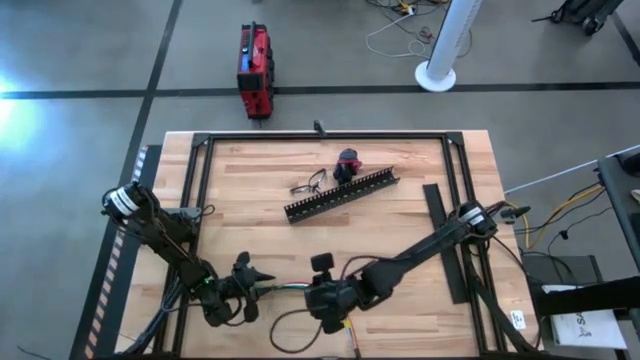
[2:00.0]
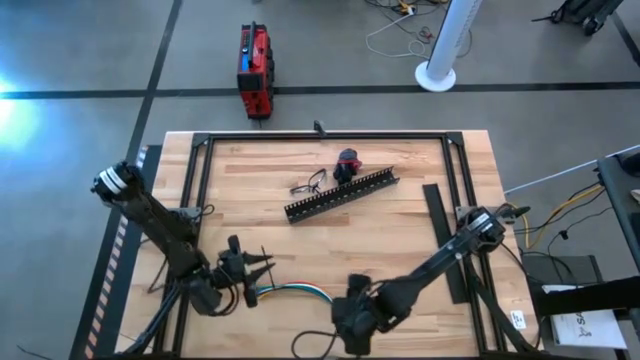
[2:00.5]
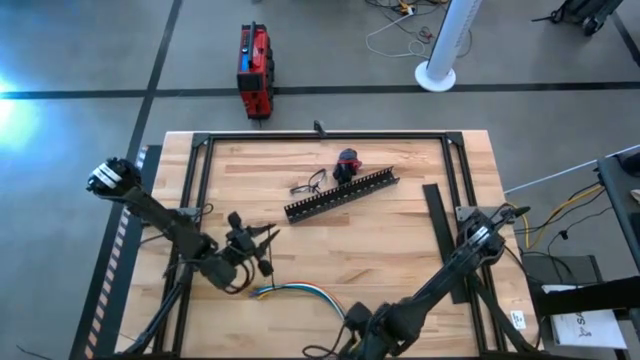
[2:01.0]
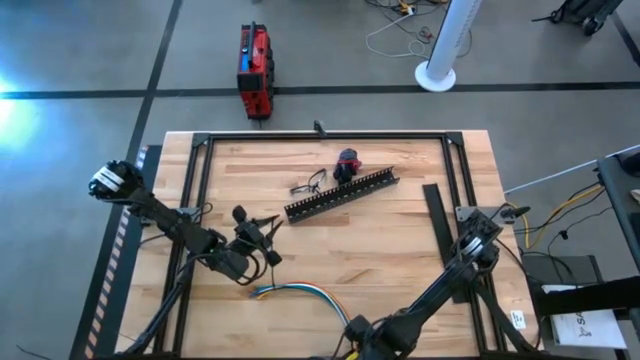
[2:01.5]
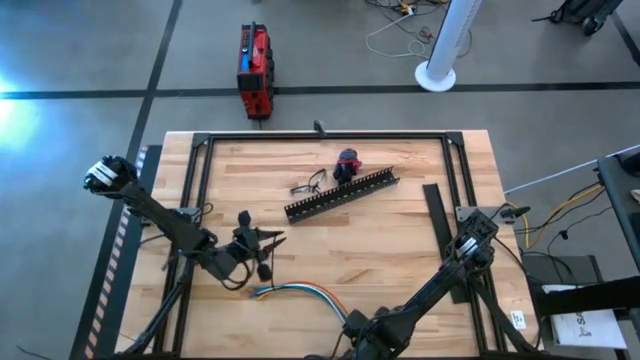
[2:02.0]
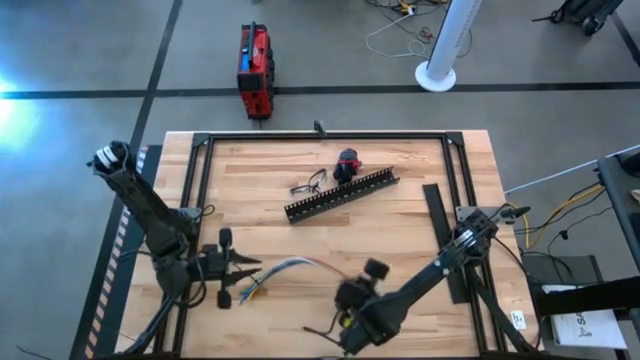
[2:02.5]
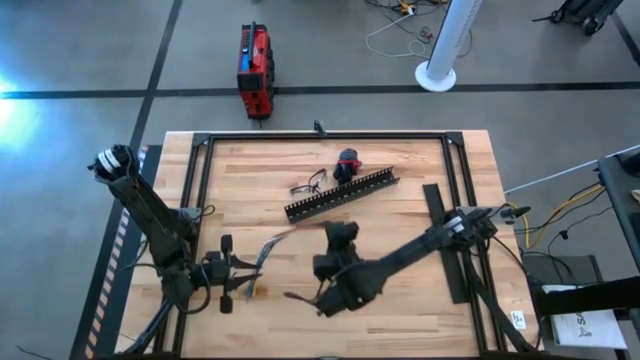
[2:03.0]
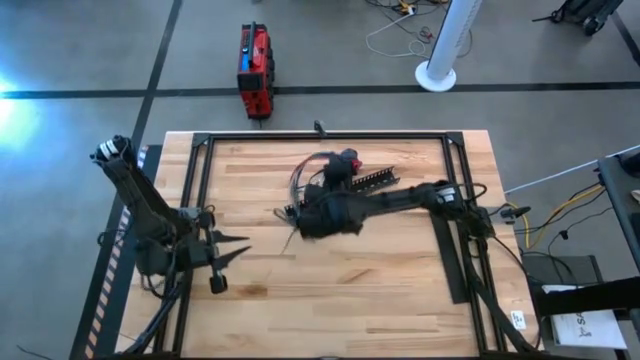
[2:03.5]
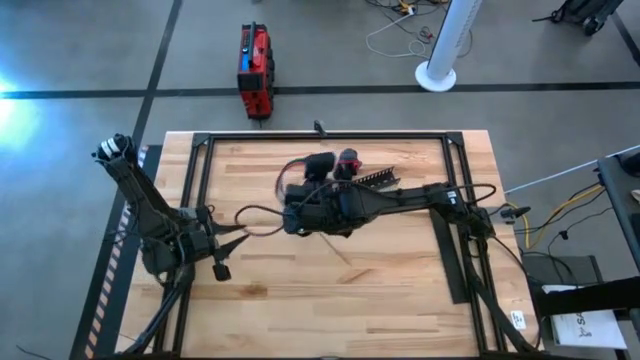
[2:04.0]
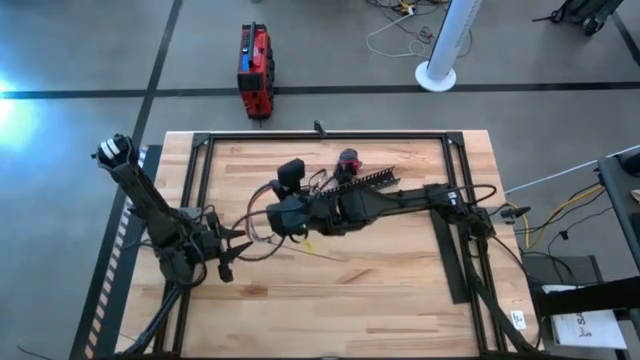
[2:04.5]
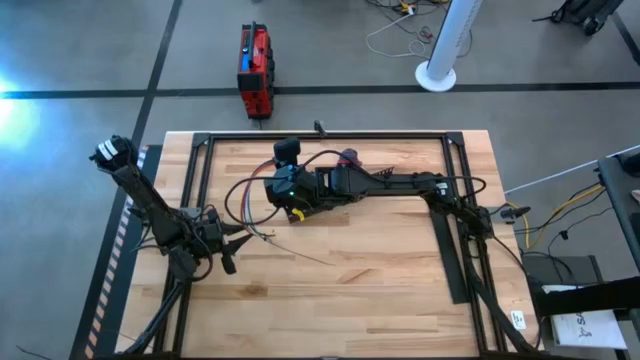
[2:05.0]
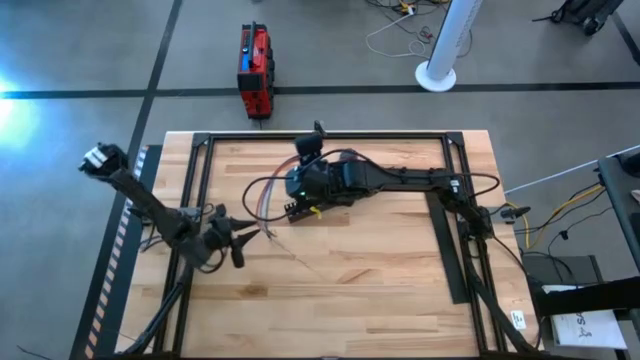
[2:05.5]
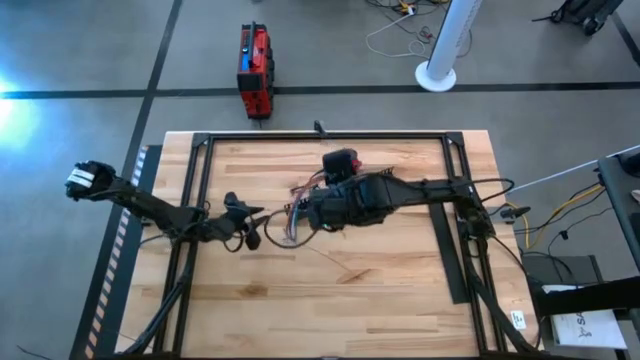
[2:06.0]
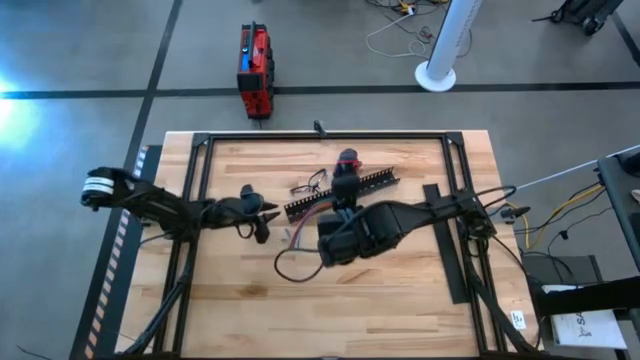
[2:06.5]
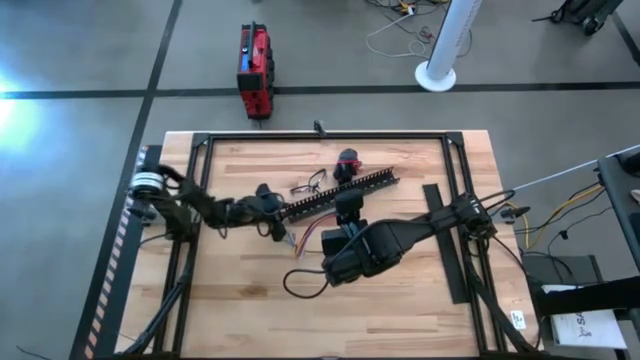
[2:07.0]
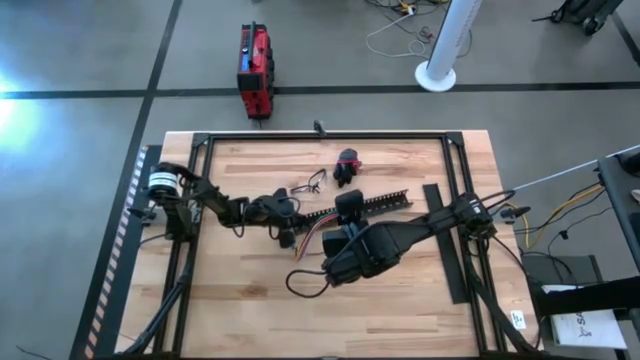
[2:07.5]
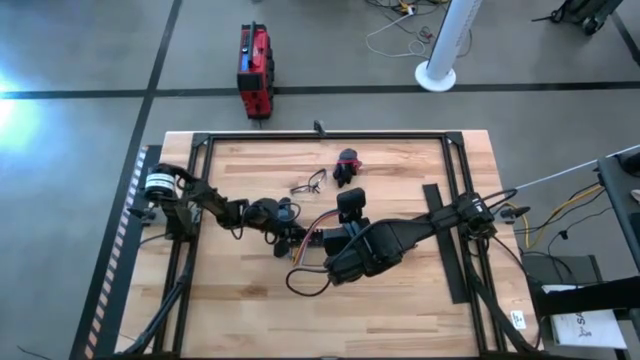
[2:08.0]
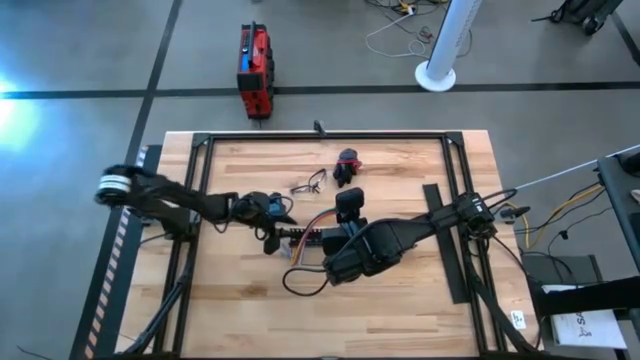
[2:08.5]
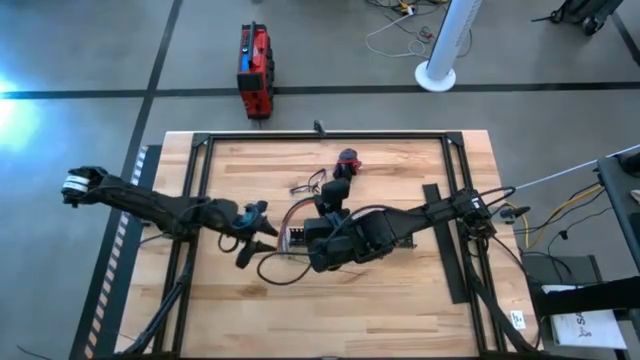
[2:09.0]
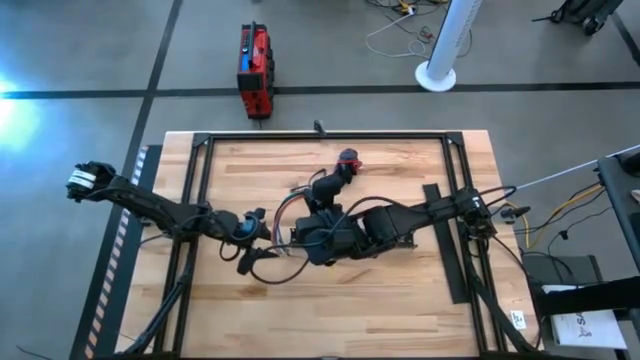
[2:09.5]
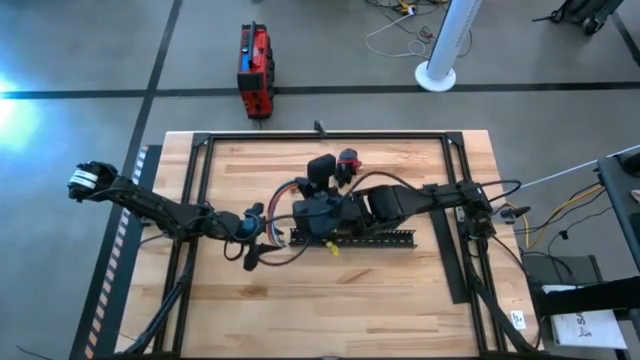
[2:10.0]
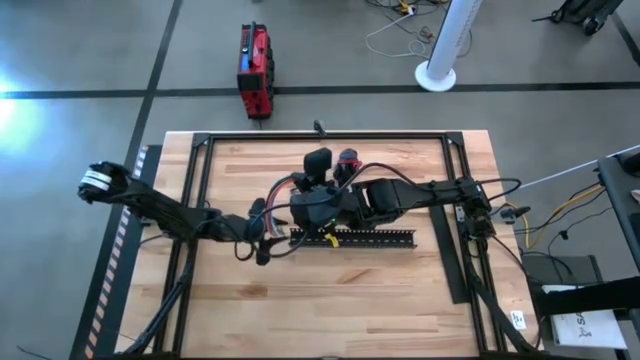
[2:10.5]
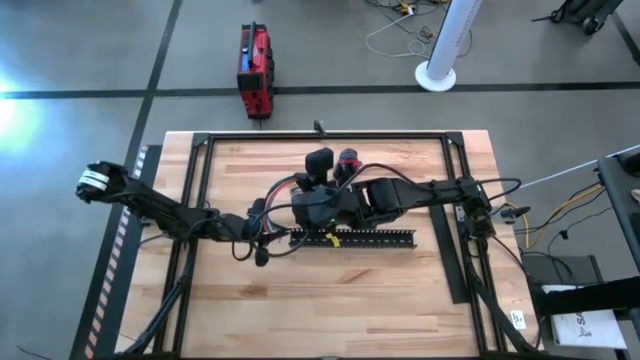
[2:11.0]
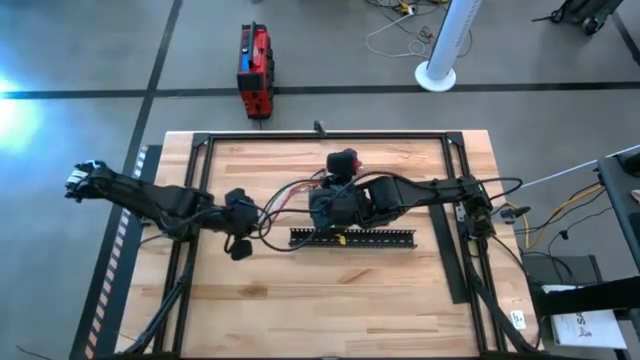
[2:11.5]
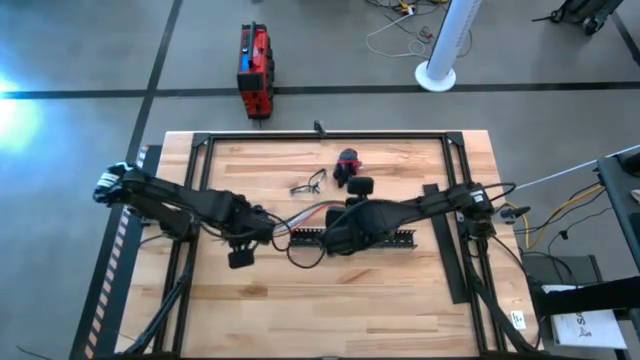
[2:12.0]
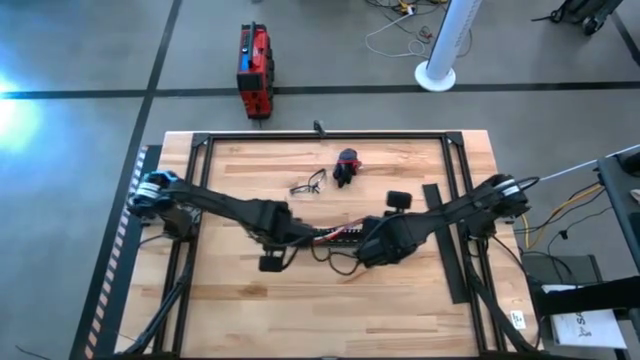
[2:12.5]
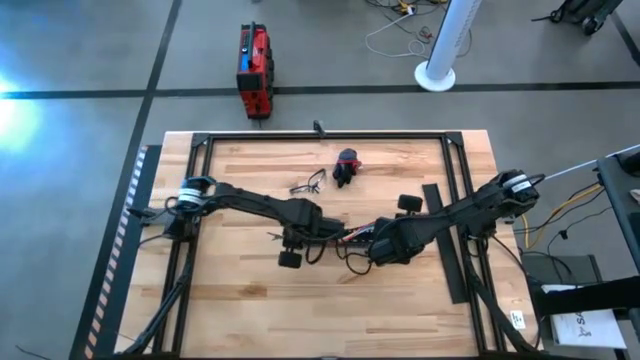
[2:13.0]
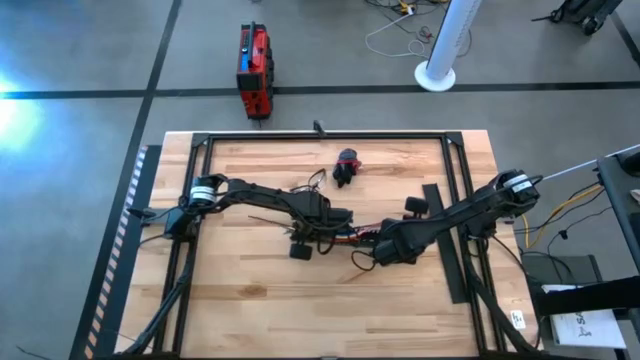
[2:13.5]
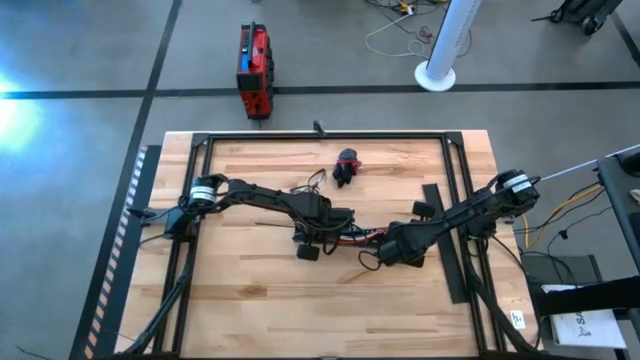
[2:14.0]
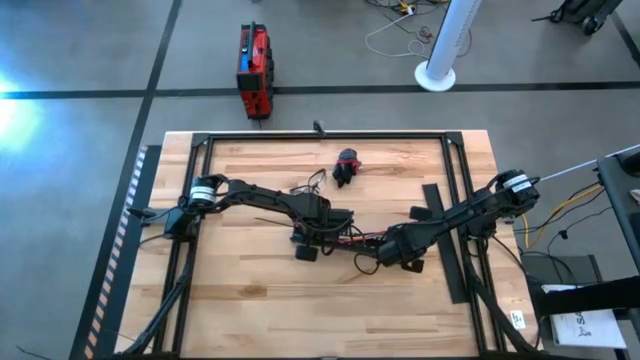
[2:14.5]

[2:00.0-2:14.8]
Task: Ziptie cables
Put the ziptied cable wires into the black cable duct

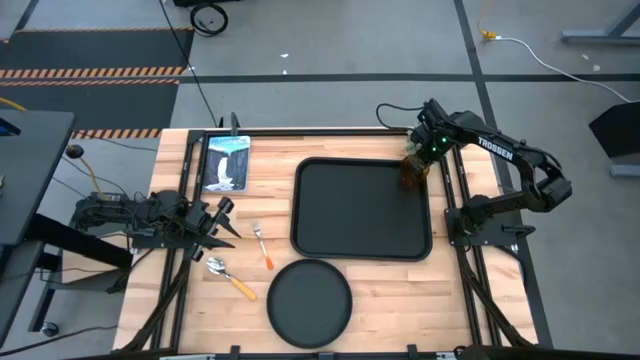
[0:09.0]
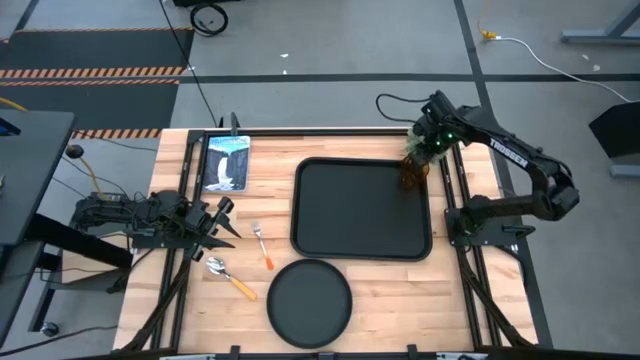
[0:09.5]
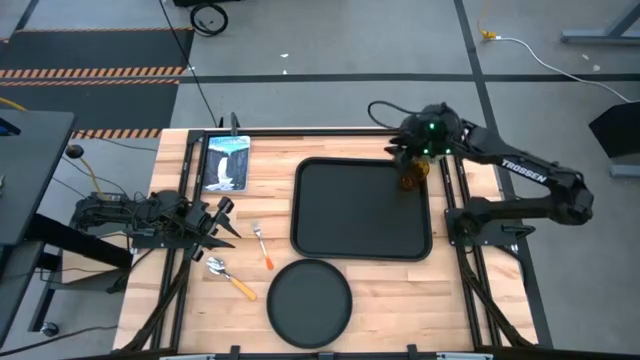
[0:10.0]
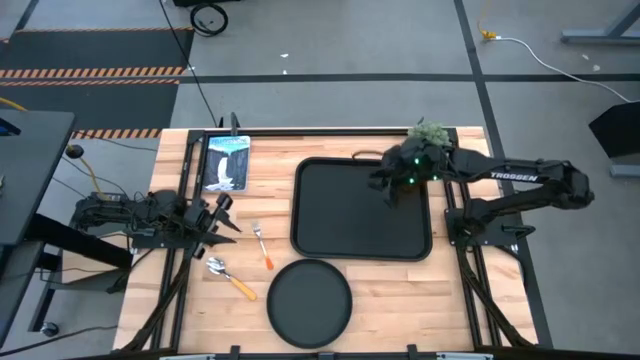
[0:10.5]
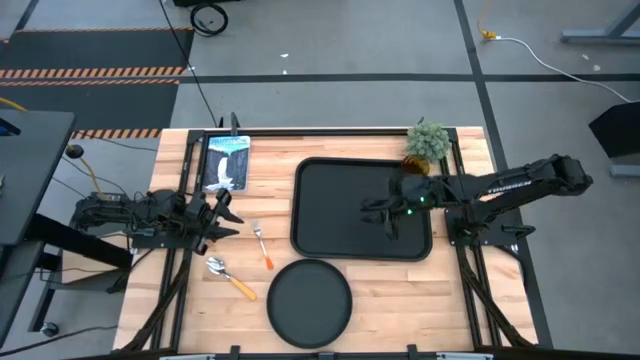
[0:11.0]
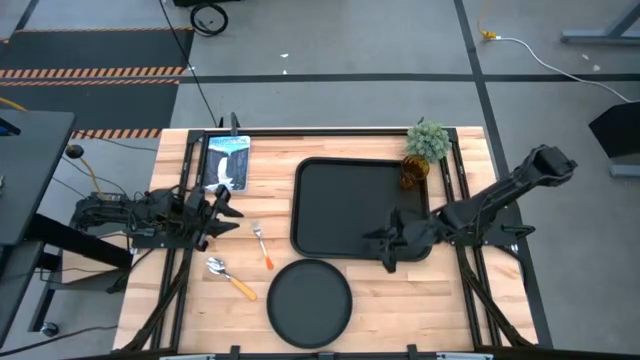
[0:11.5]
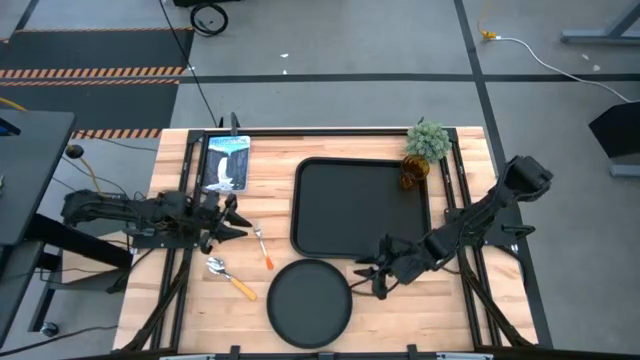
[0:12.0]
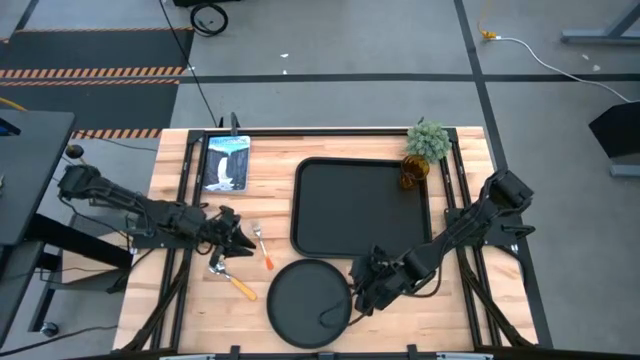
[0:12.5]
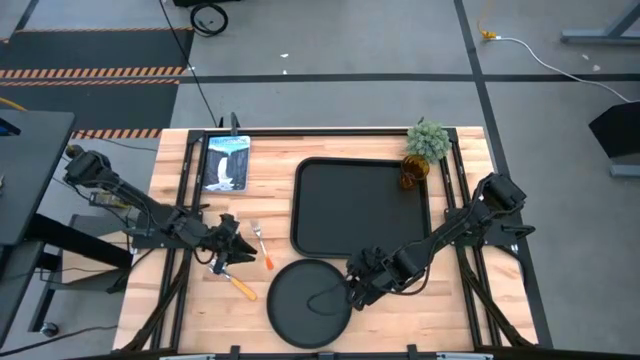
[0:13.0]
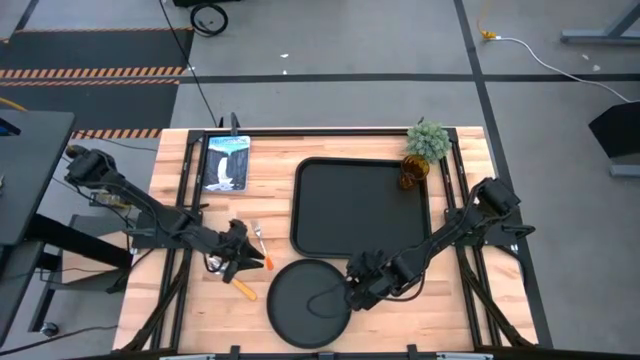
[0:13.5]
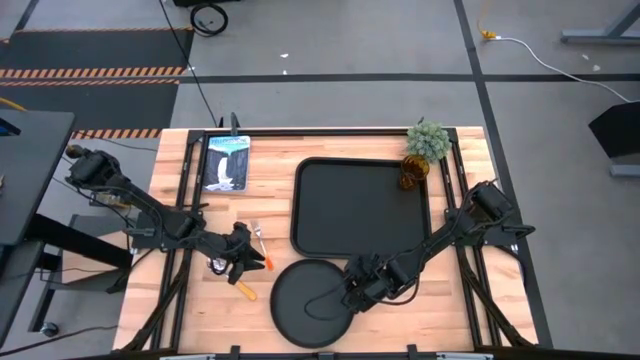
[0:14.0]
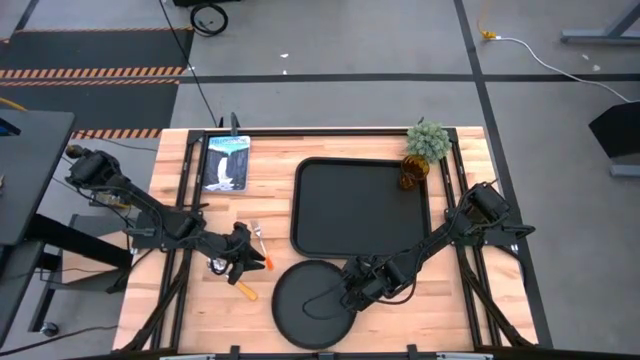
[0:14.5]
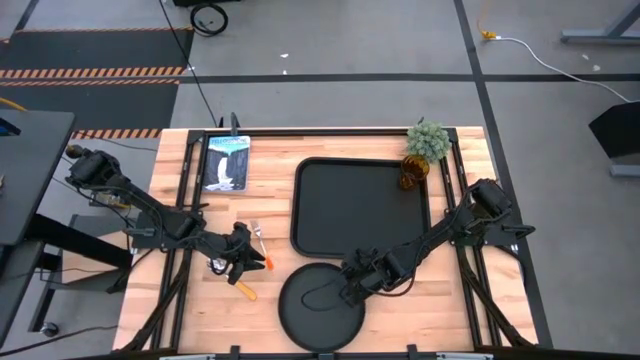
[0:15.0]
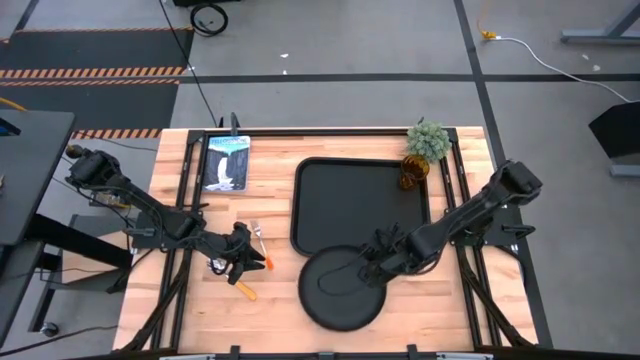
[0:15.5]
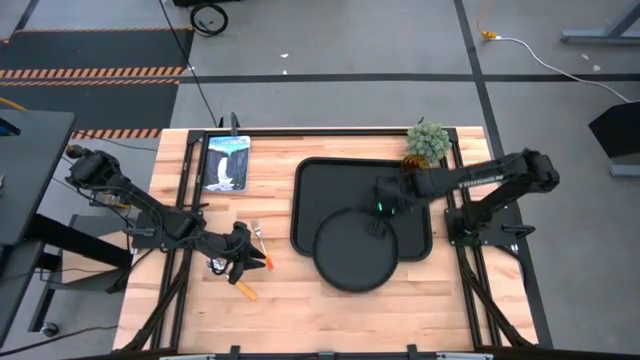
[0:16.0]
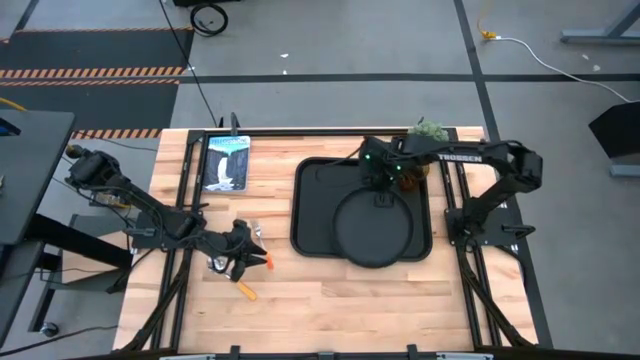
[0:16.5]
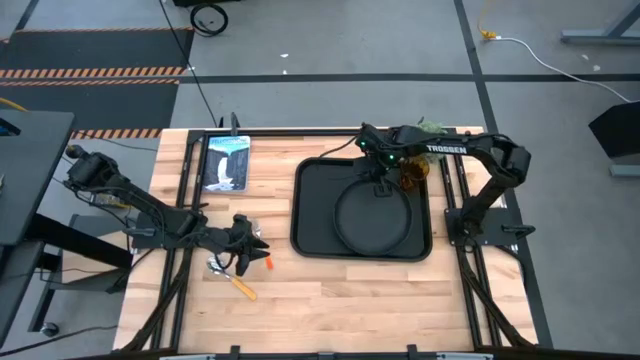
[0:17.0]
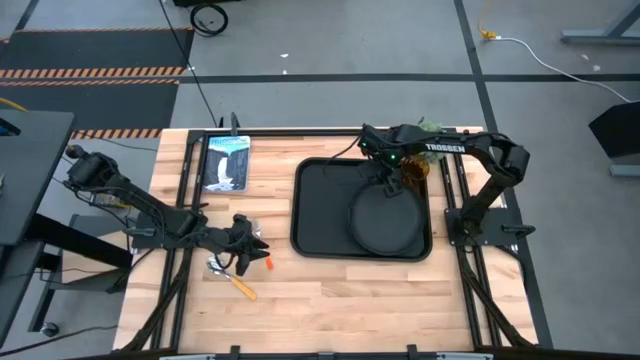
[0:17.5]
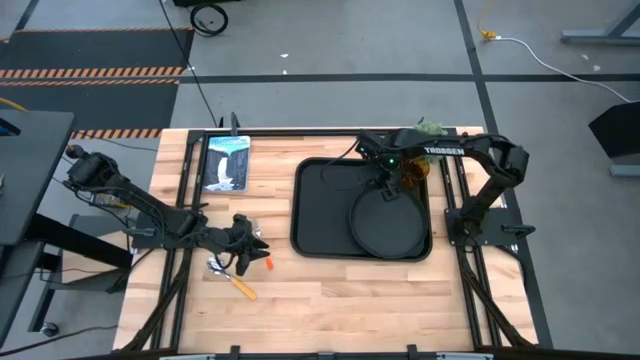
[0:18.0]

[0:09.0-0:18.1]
Task: Pick and place plate/cup/fork/spoon on tray
Put the black plate on the black tray
